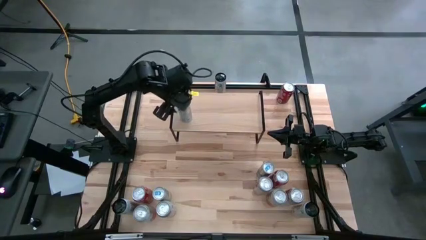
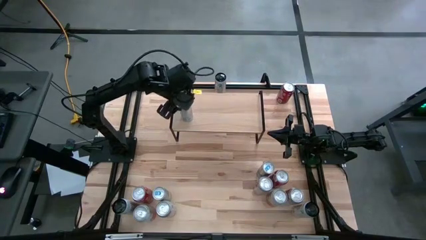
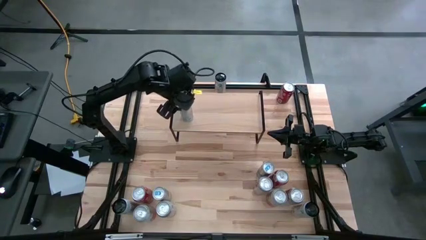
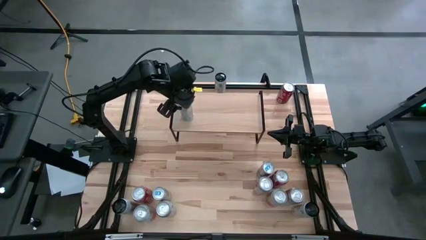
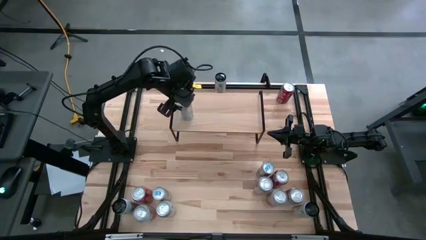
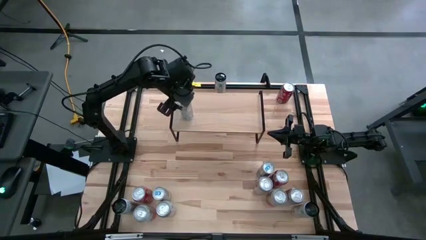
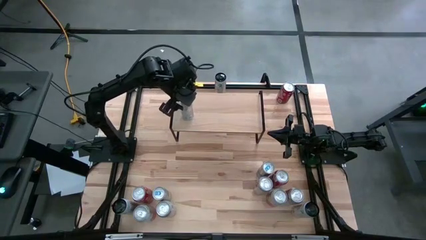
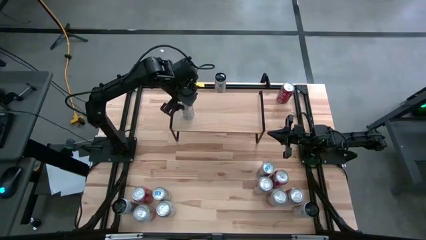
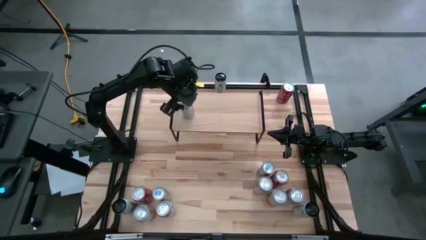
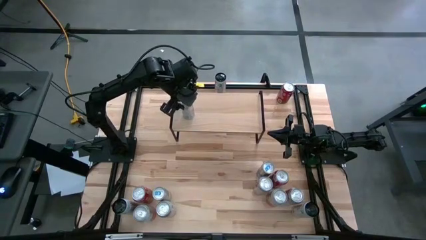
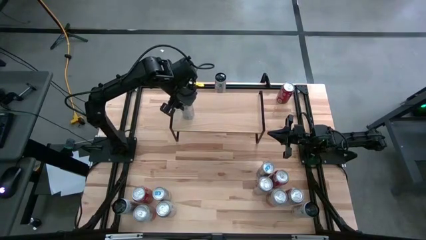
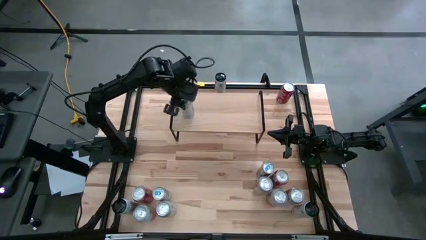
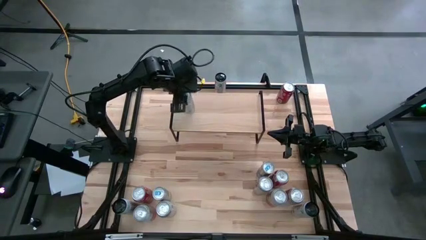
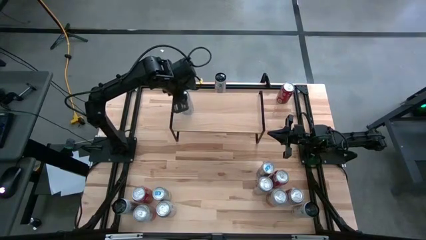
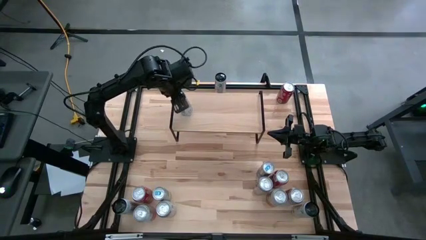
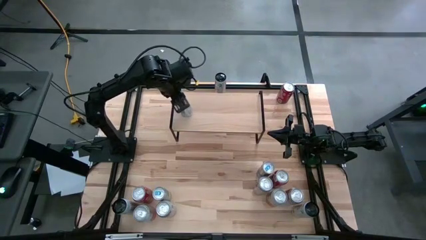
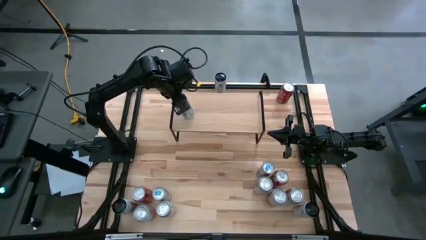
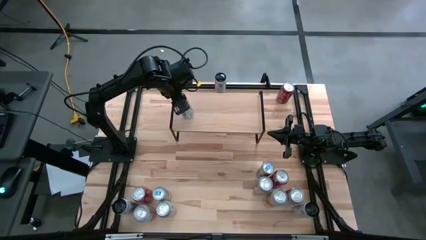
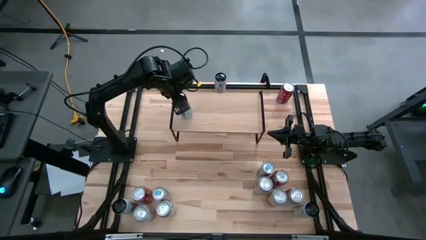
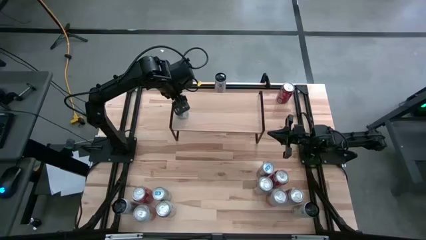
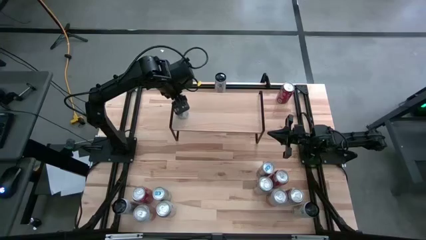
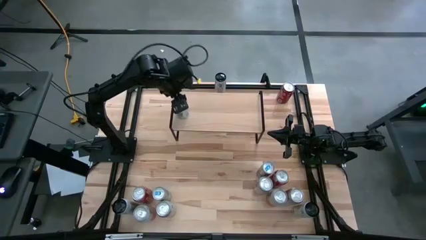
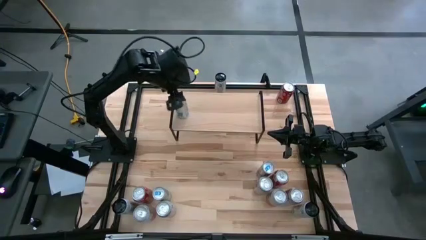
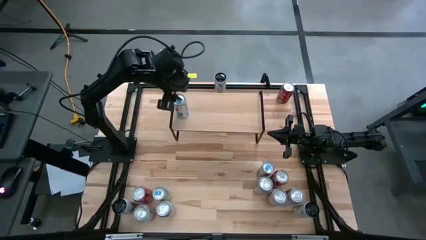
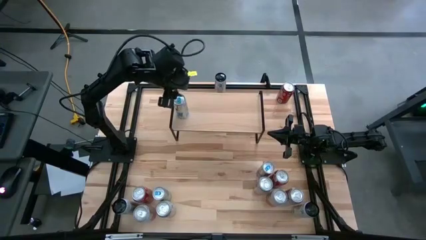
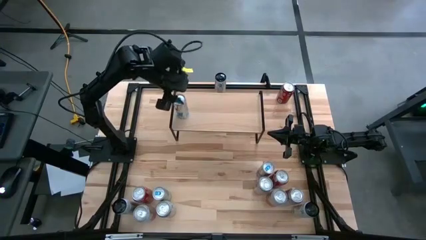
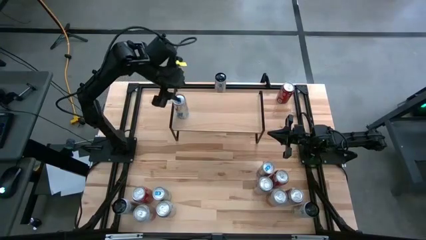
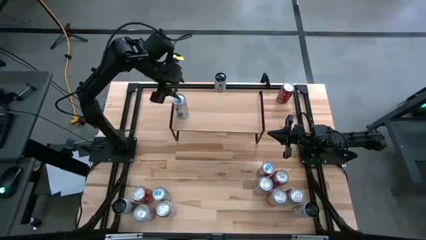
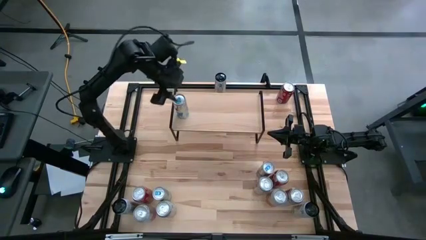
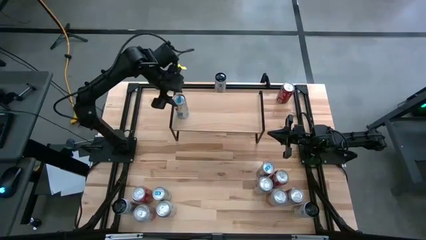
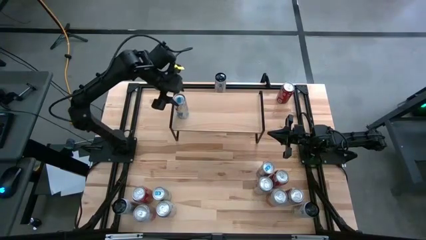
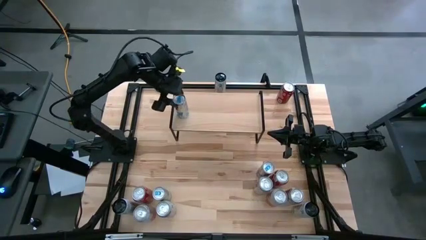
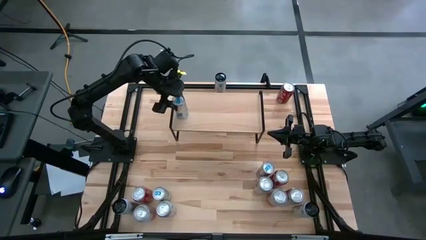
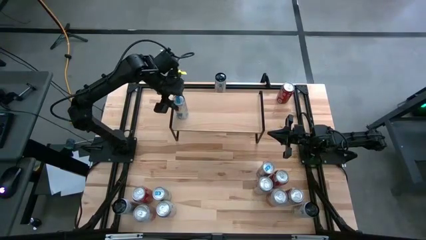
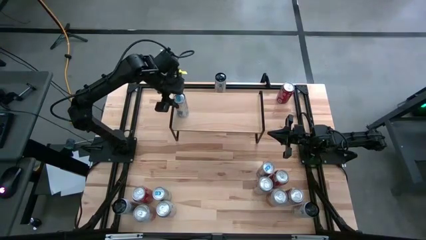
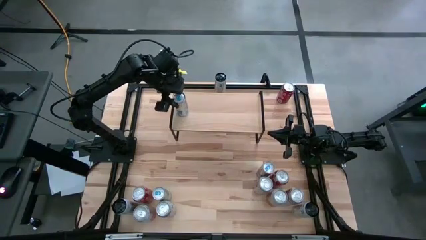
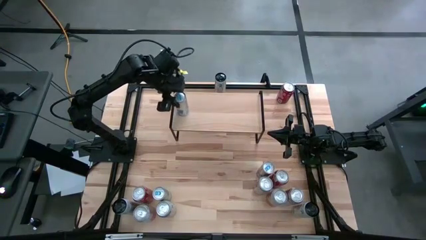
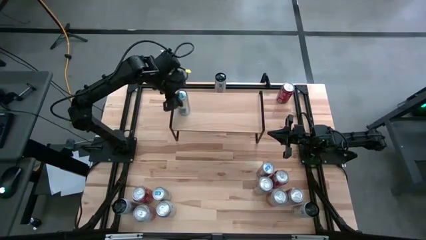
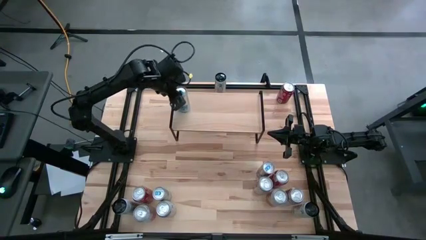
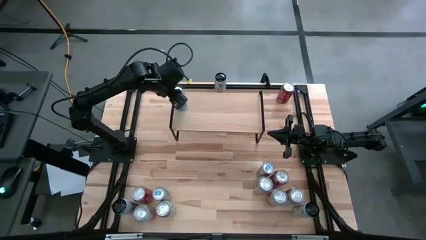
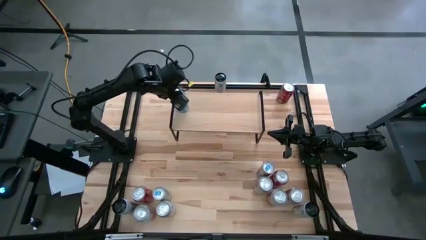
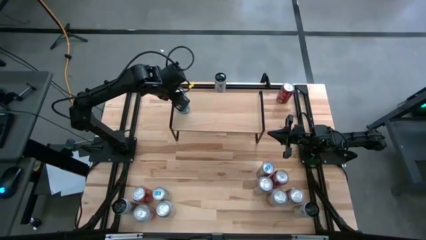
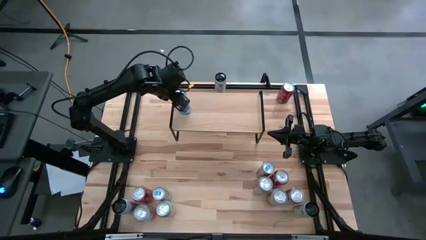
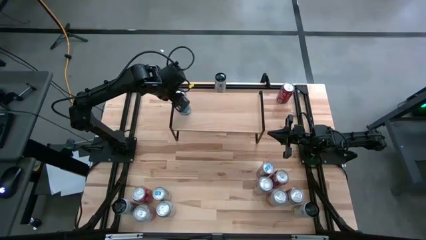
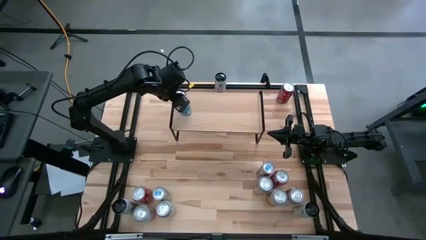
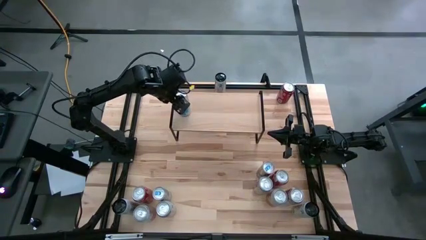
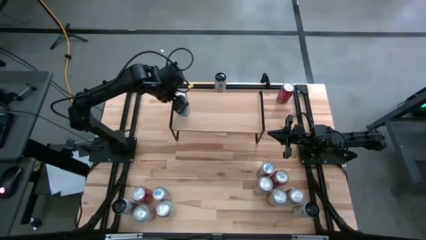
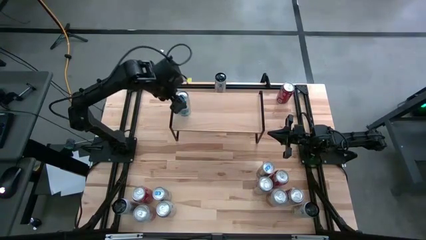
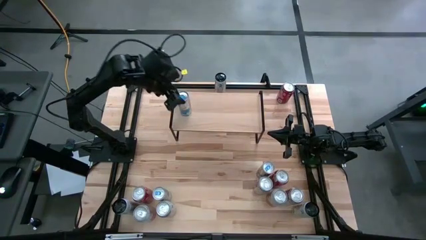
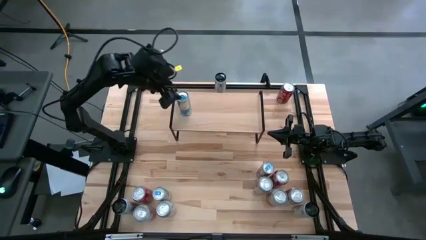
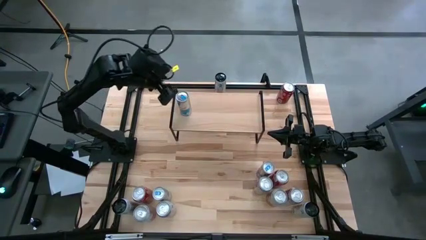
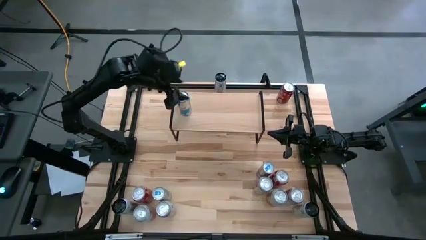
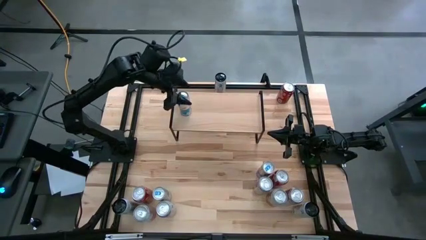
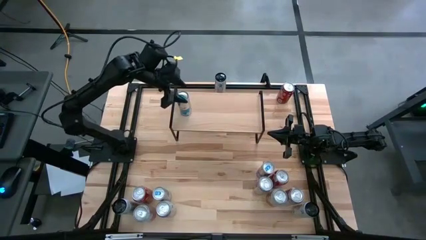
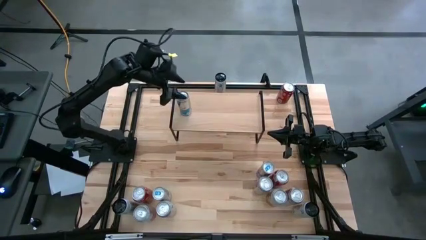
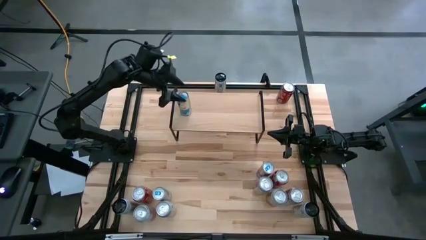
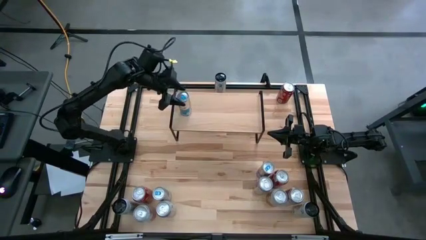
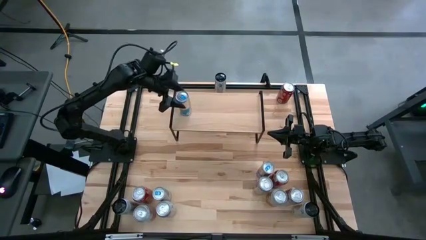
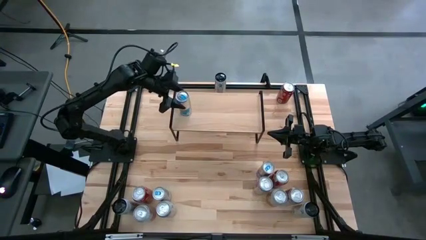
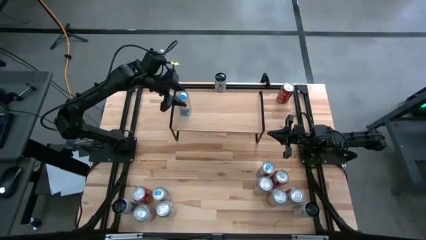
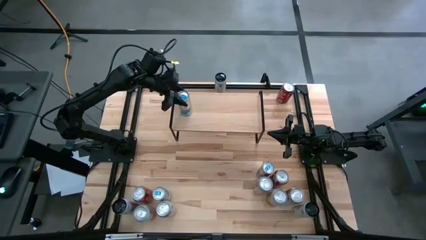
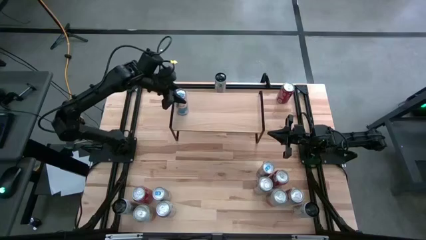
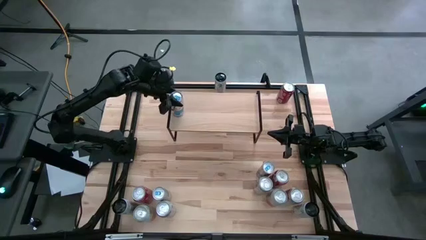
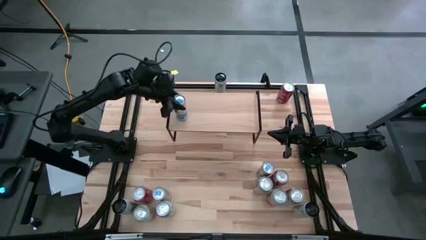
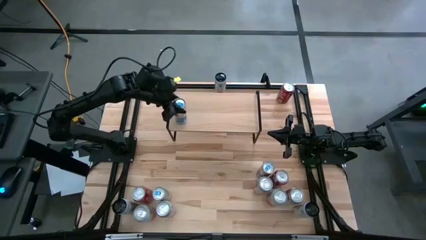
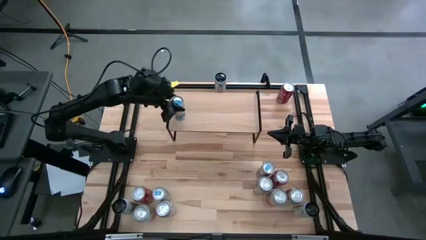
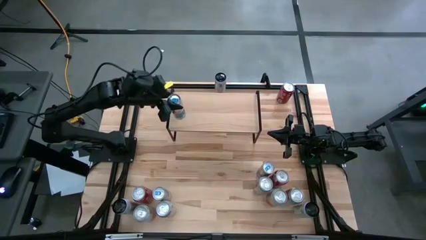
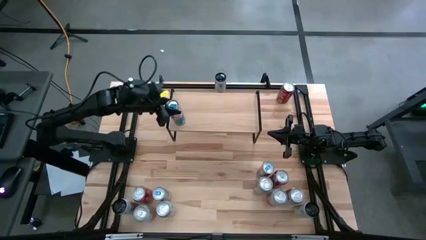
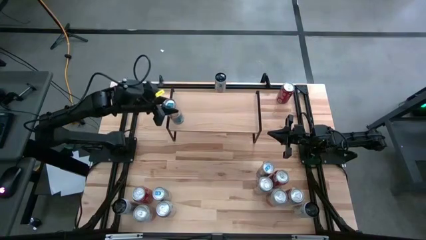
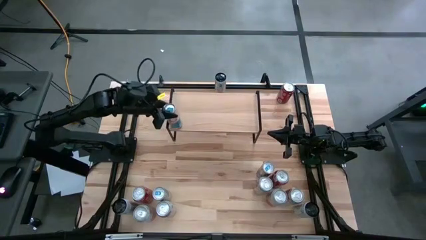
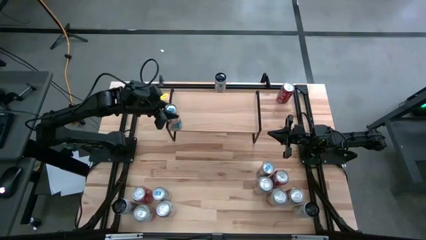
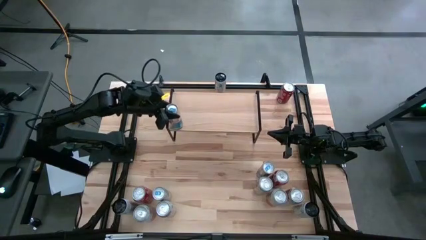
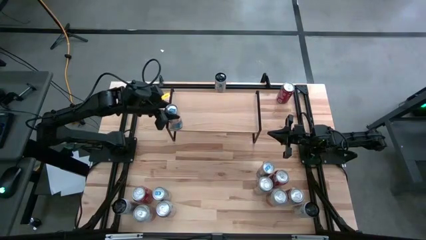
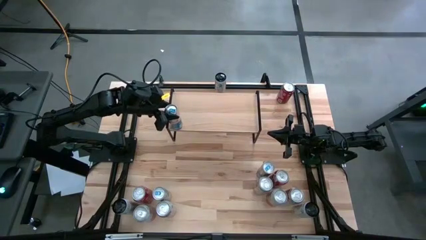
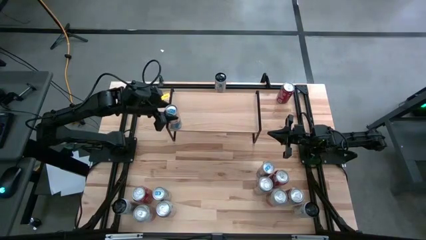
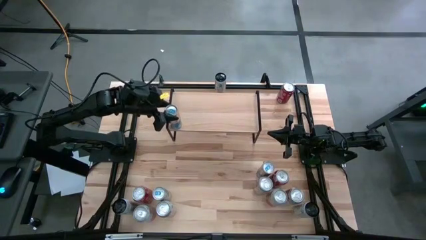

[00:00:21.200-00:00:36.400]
Task: Place canned beverage on shelf
Put the top blue soda can on the shelf
